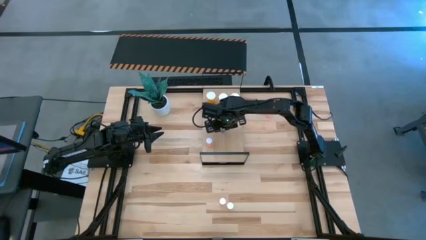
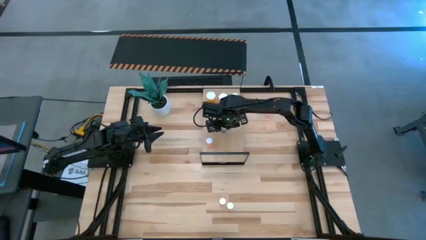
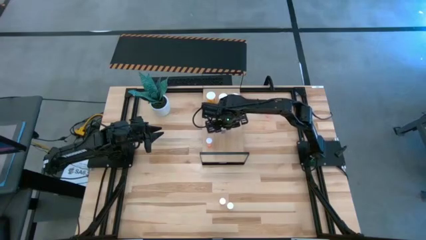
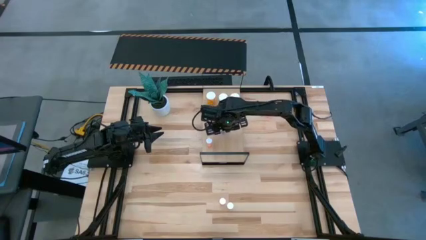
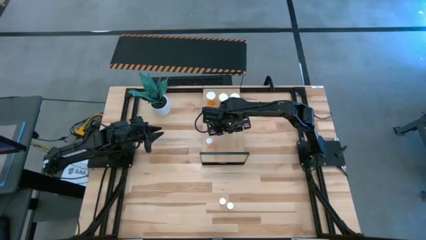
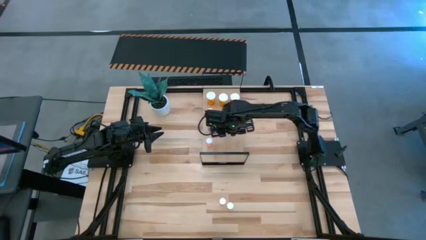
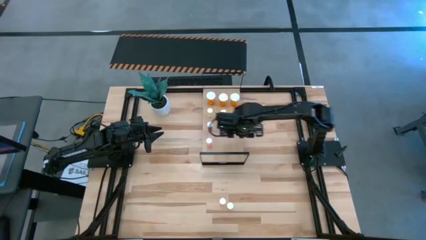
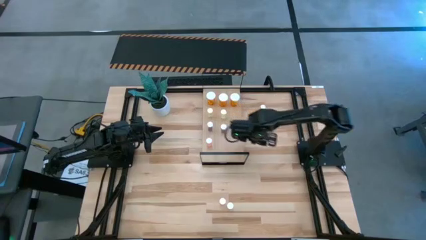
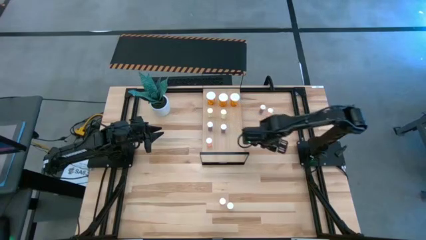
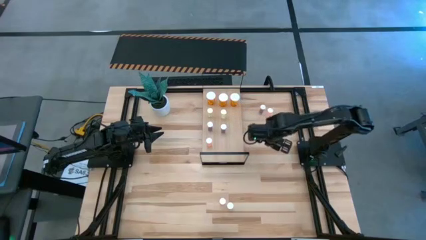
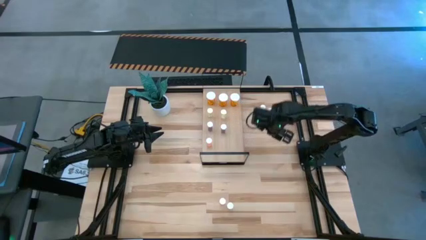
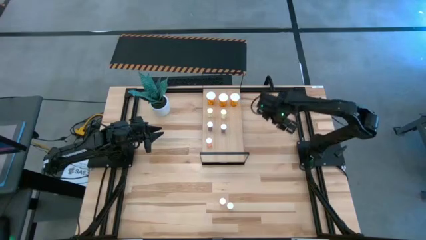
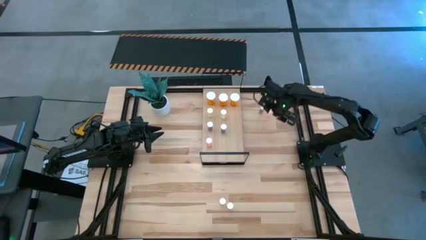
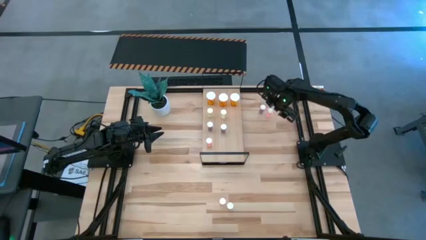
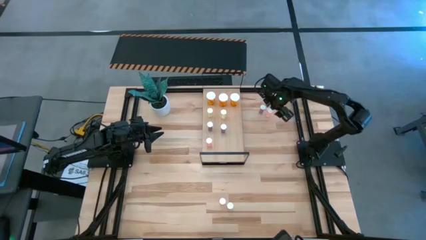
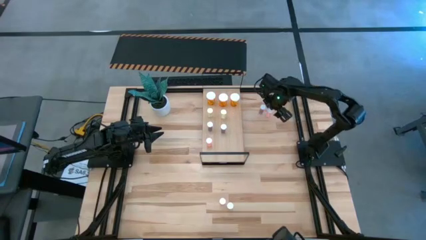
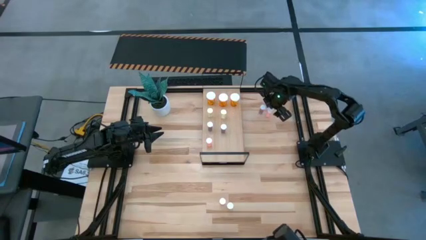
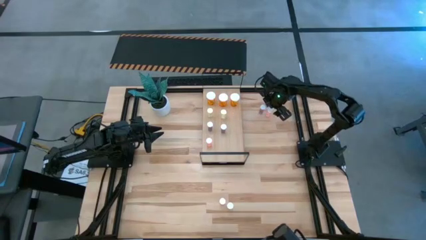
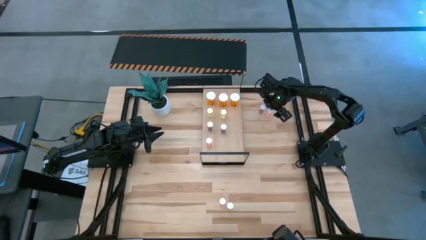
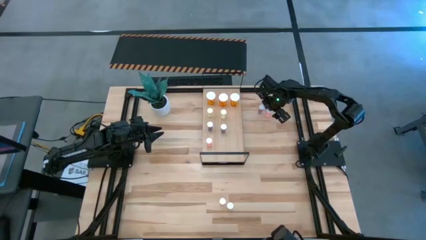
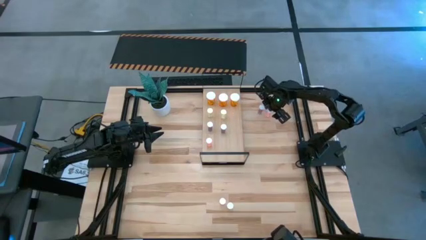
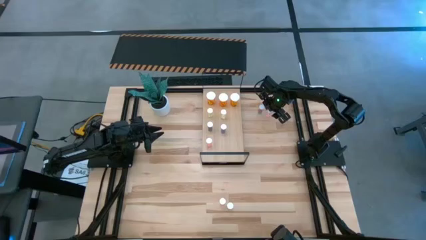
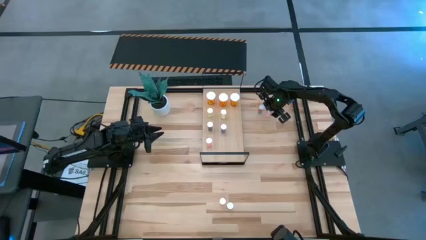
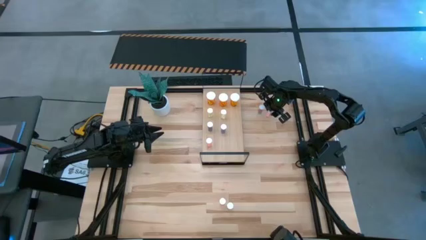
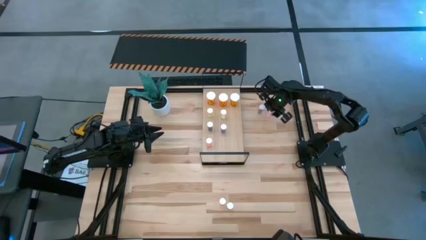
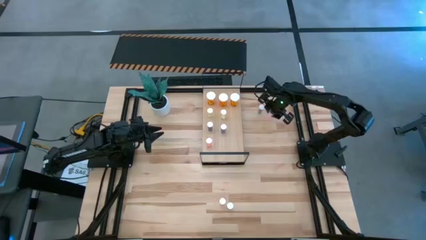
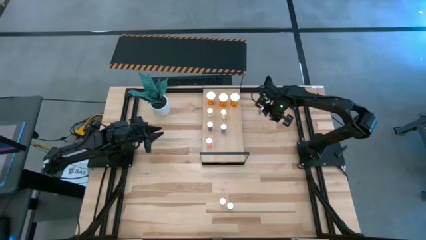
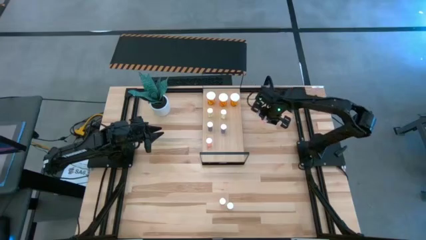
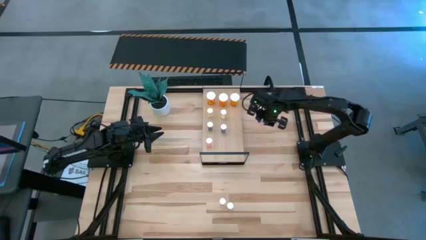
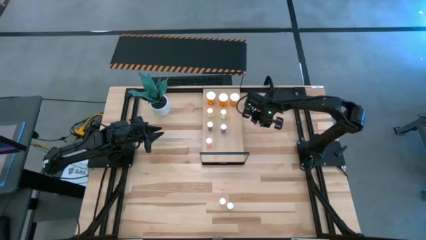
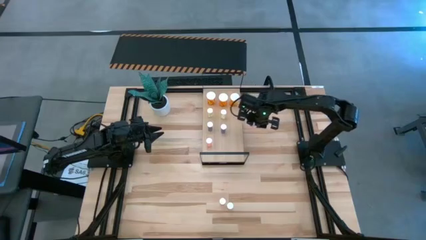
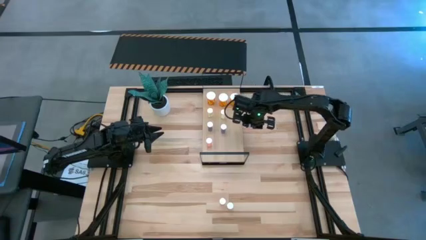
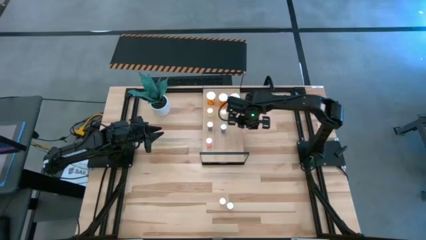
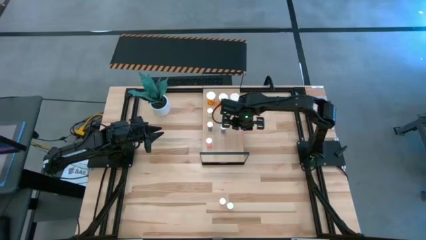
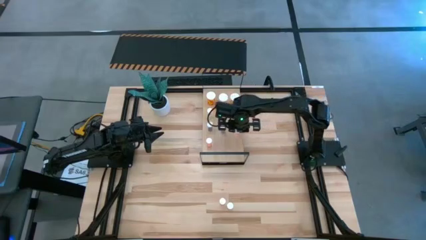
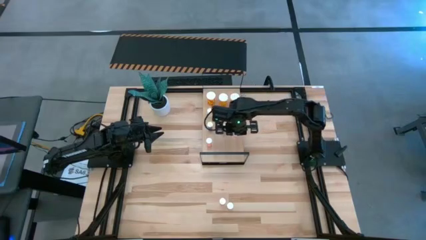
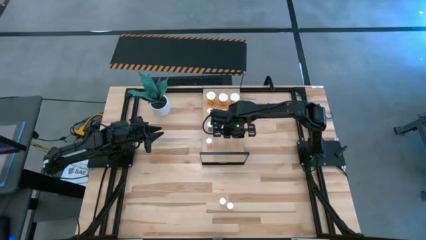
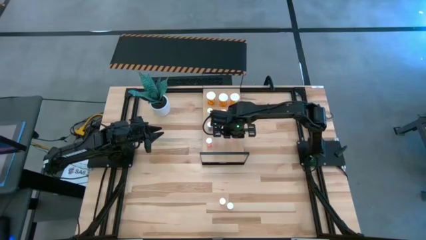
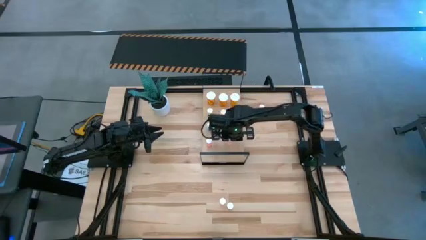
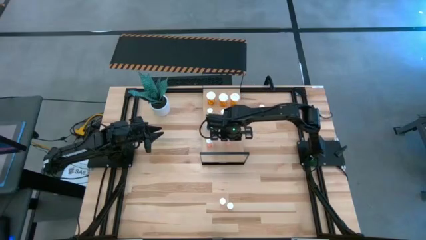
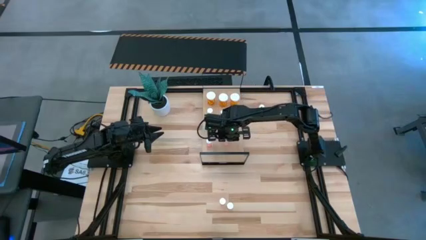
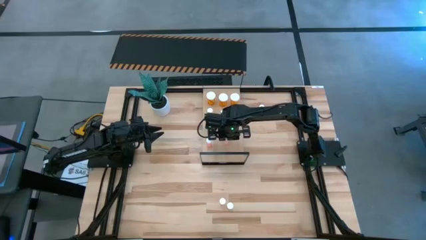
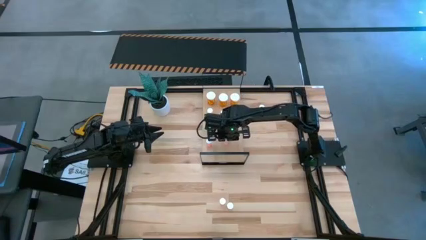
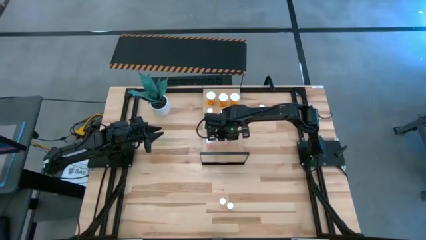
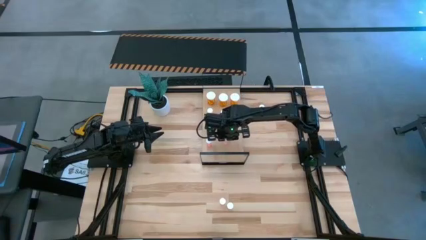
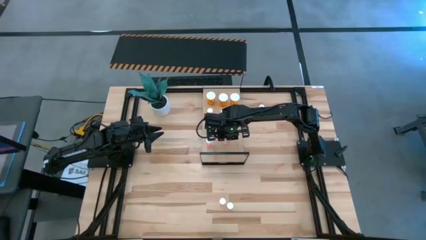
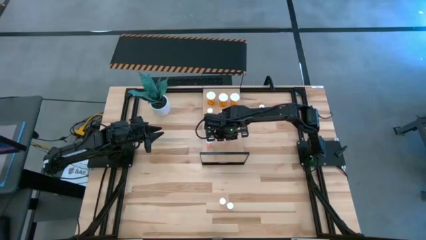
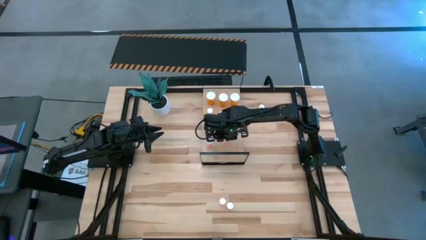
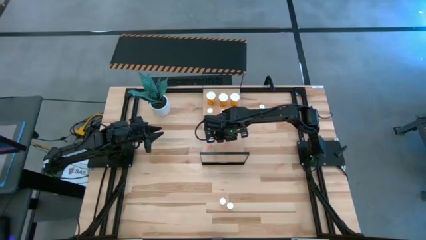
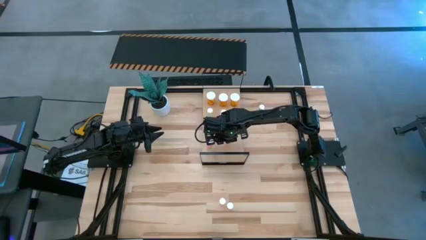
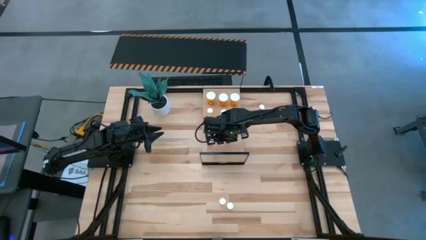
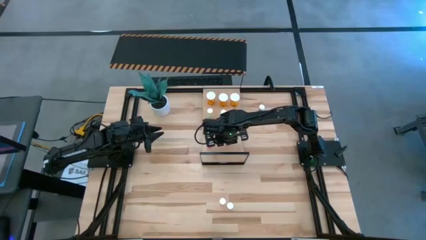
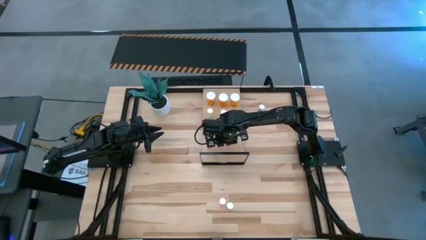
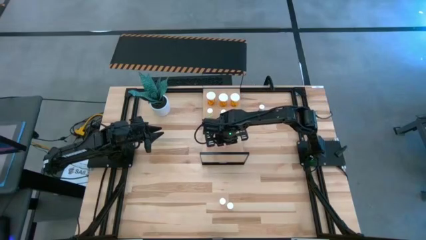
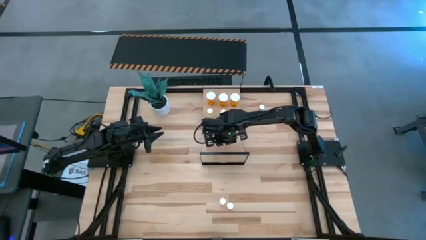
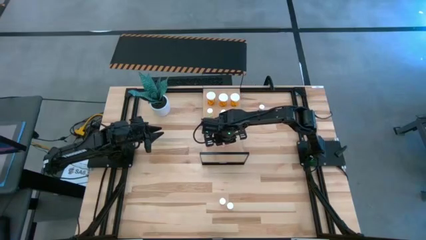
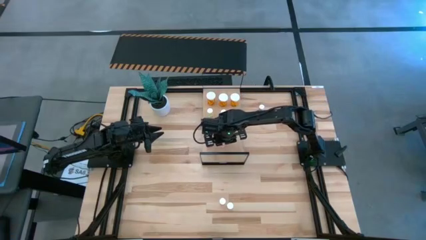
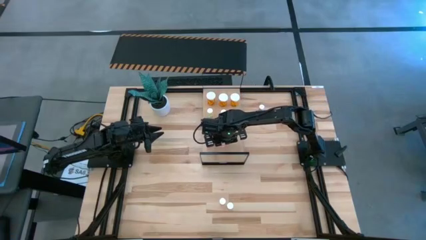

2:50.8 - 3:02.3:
Task: Pick and place medicine bottles onto shelf by color
Put the top small pink pill bottle on the shelf aligned with the other small pink pill bottle

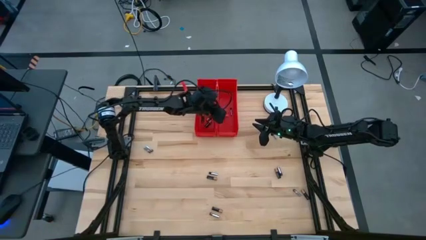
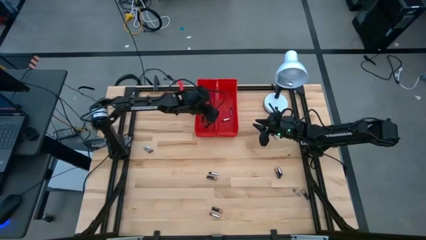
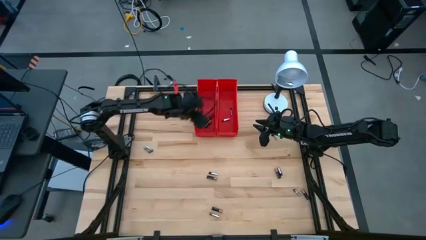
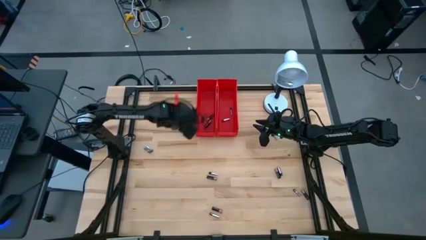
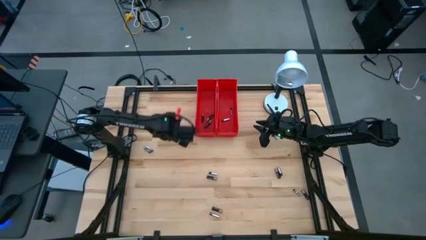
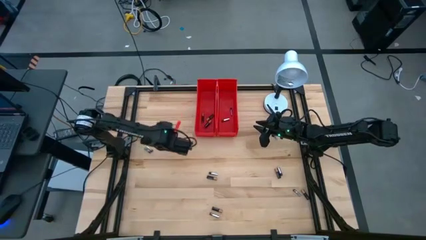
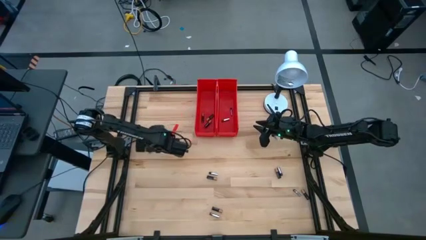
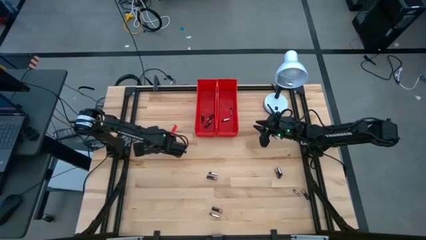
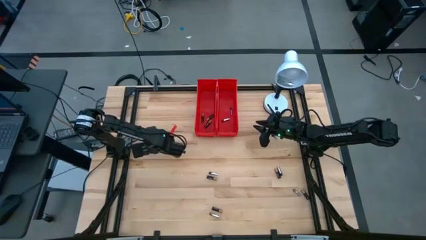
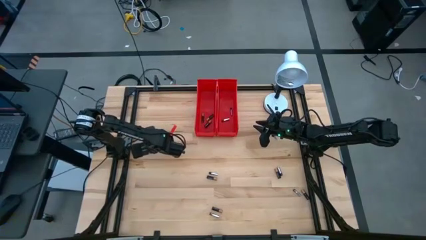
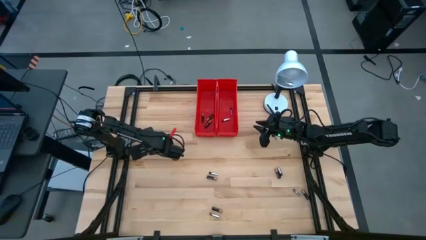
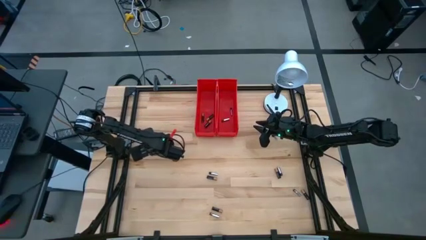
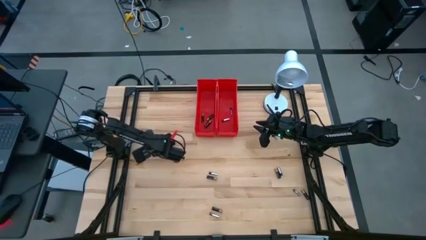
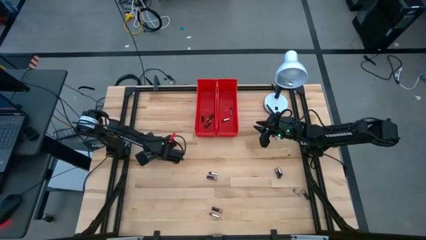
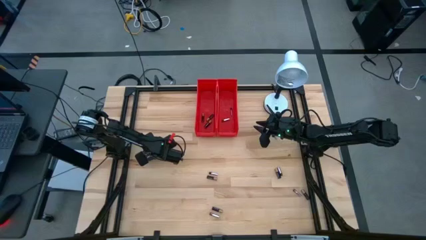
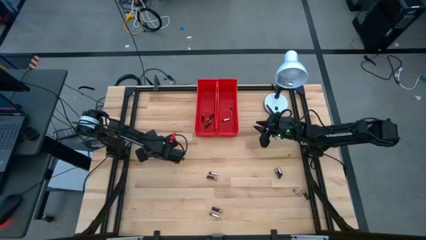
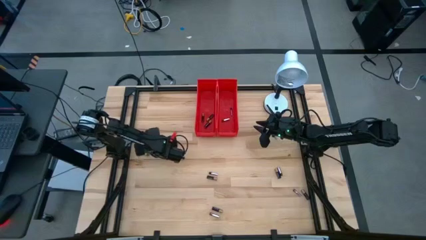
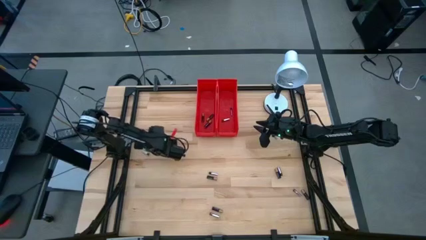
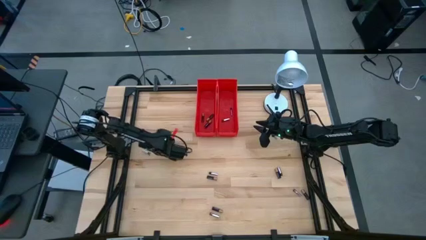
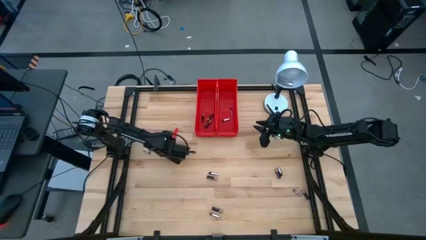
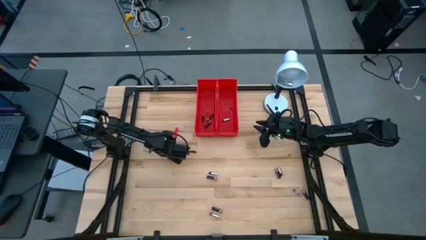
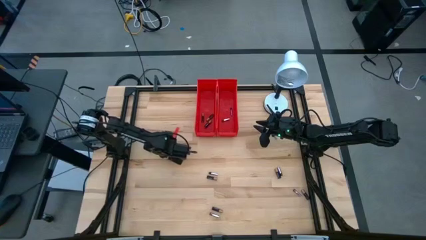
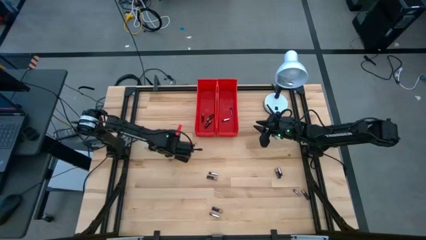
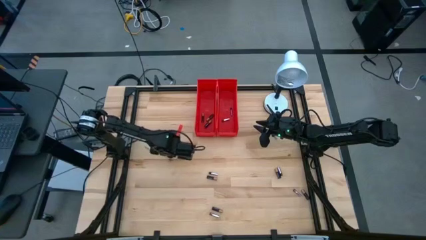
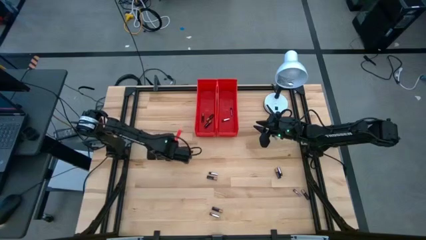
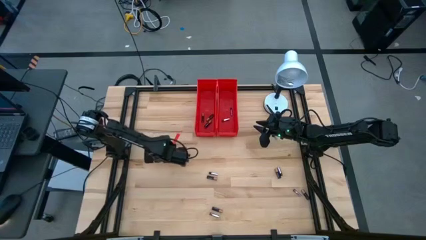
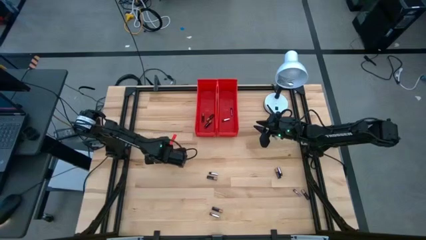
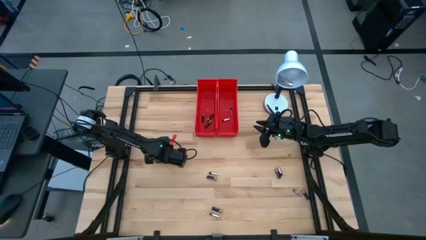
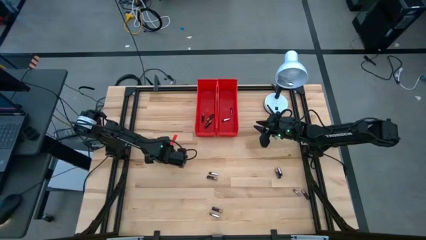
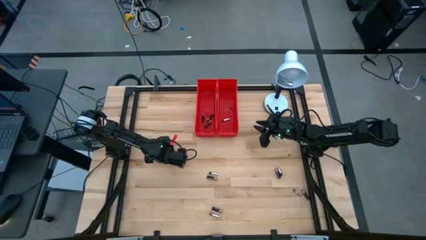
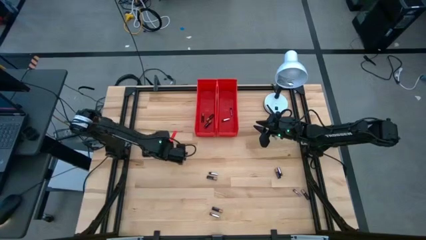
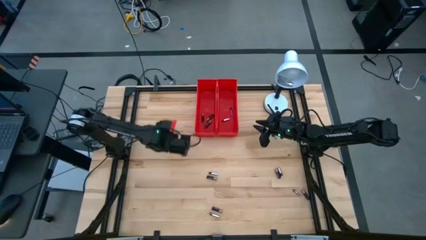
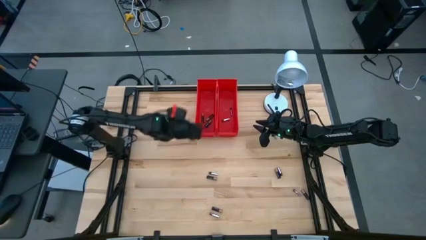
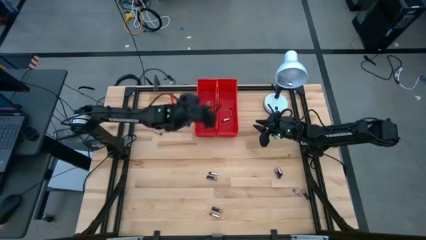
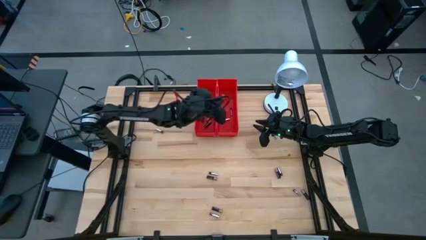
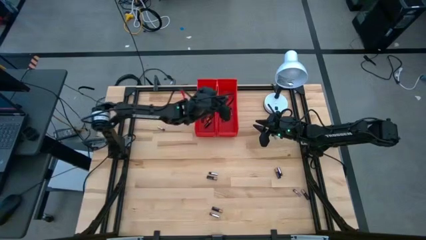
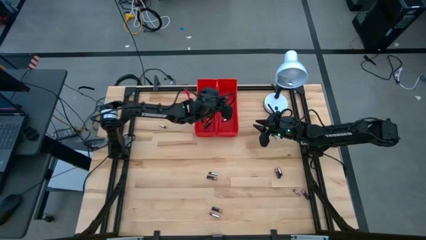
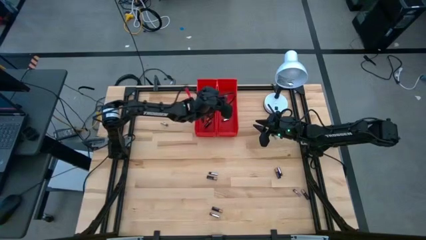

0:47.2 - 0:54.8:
Task: Sort batteries
Put the silver battery into the right red bin
